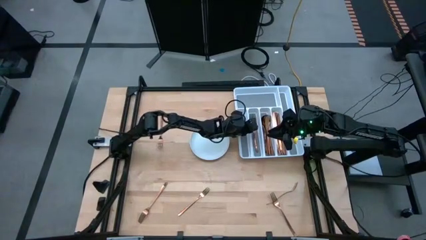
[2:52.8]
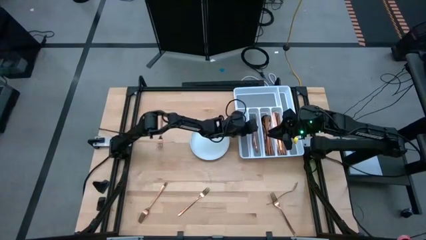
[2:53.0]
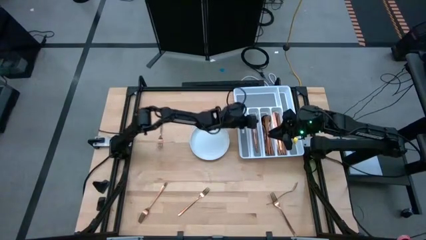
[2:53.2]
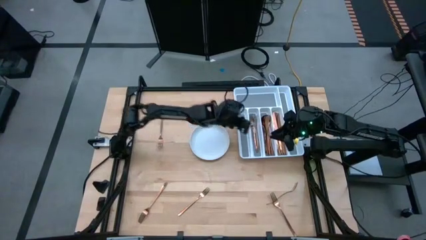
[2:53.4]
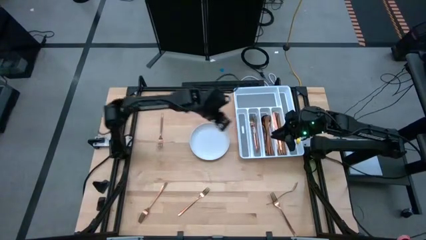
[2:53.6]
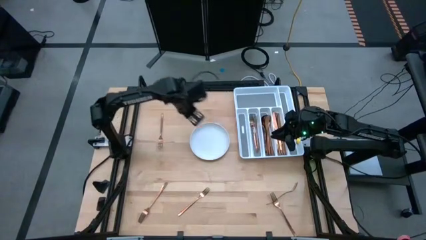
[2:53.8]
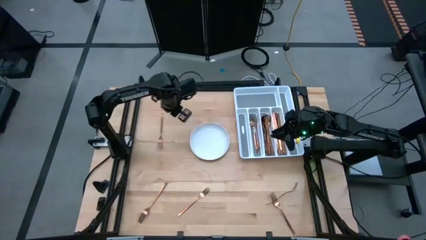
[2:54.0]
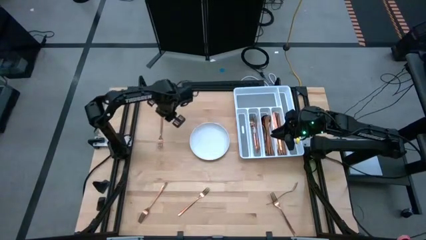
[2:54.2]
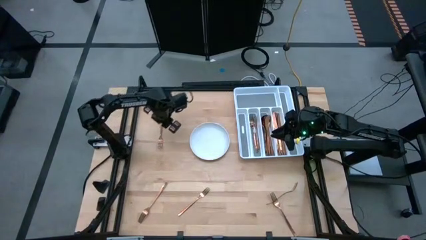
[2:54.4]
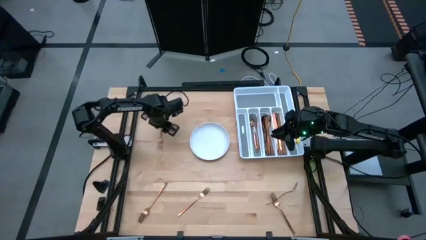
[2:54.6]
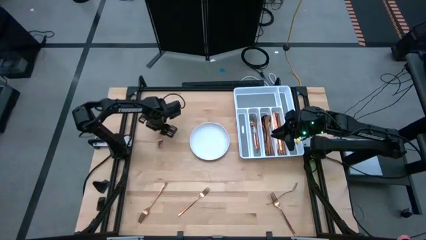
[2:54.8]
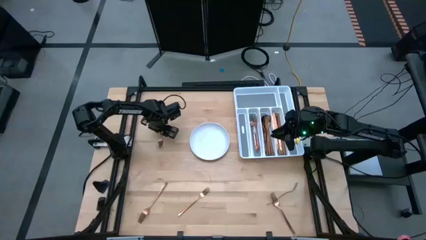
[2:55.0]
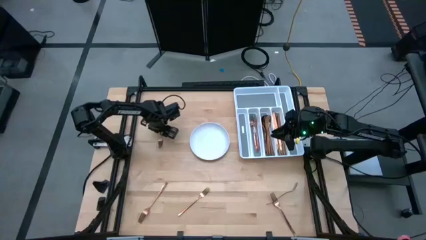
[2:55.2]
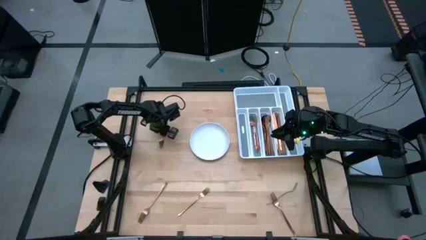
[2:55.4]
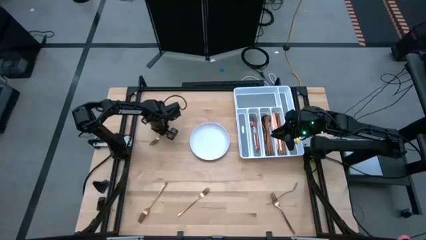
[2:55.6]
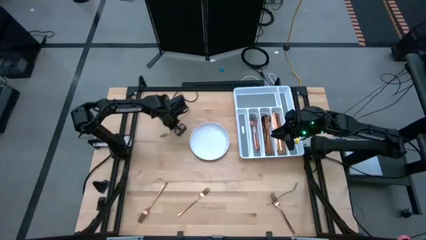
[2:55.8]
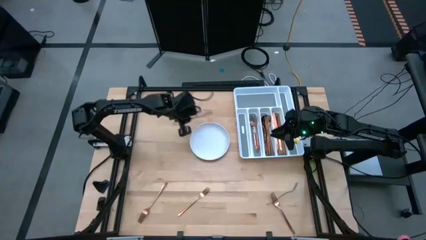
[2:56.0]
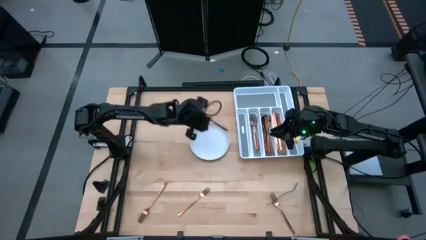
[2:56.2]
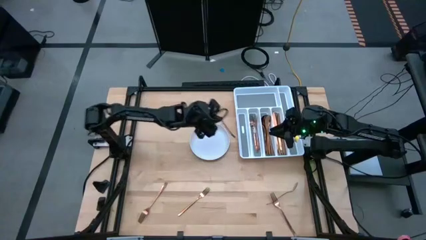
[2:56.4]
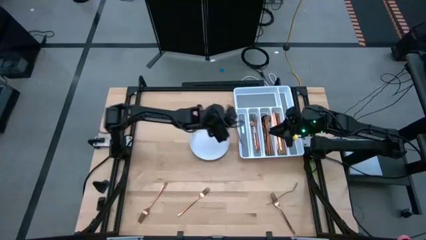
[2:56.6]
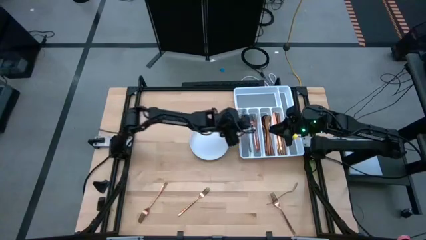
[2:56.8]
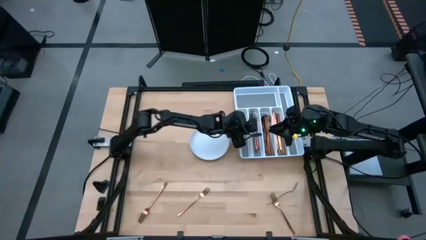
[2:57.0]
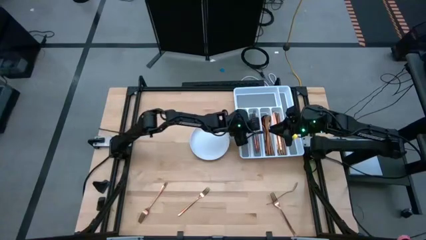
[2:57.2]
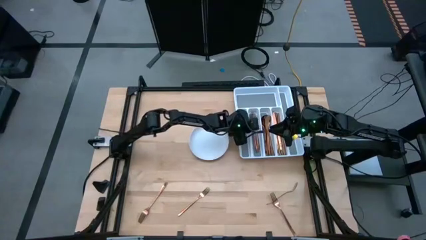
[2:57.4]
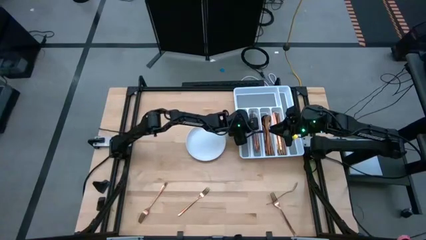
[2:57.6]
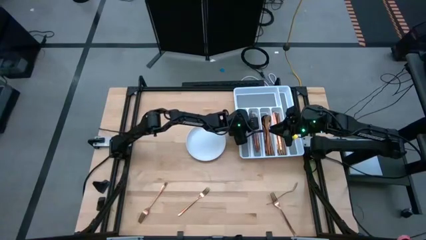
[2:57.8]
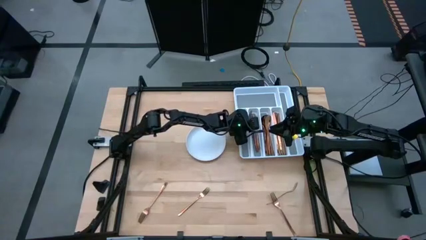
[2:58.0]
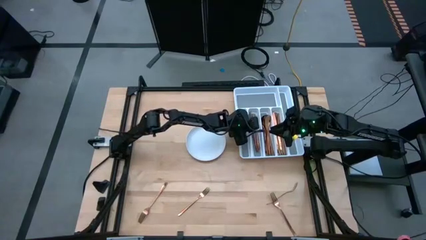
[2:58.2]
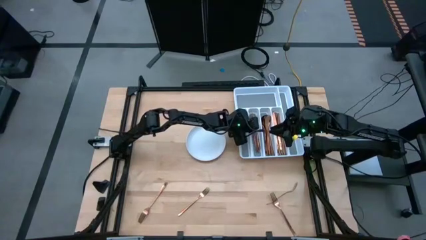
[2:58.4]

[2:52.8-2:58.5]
Task: Sort silverware
Put the fork in the silverware tray

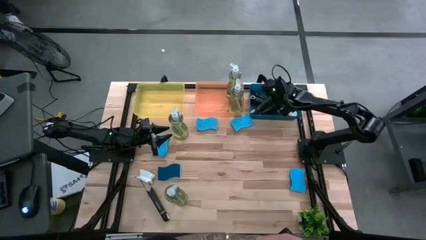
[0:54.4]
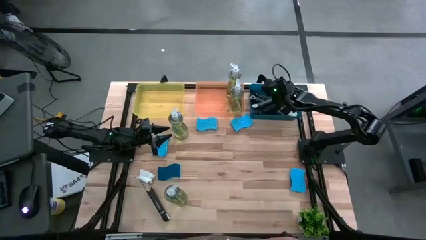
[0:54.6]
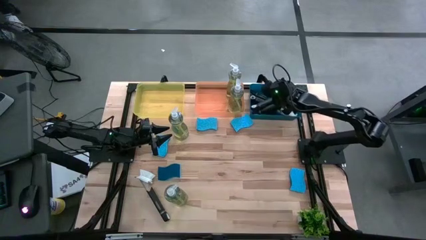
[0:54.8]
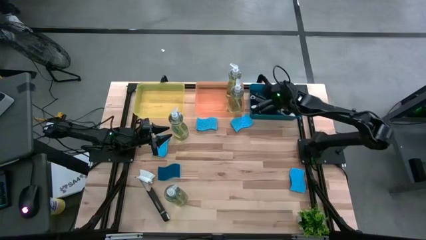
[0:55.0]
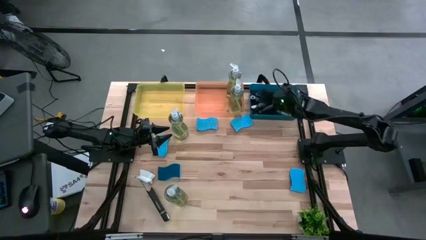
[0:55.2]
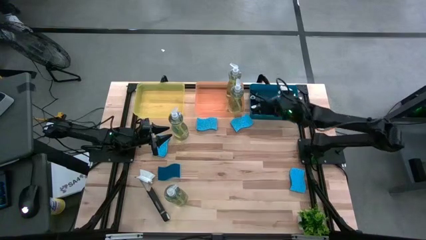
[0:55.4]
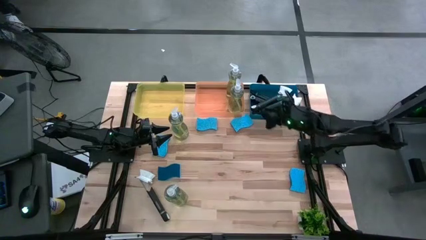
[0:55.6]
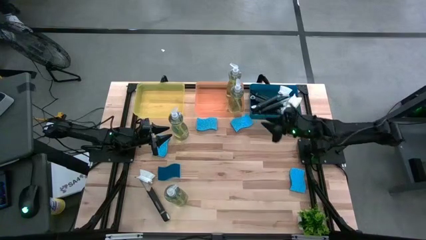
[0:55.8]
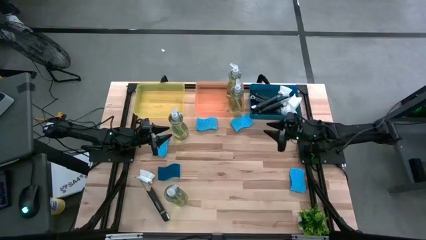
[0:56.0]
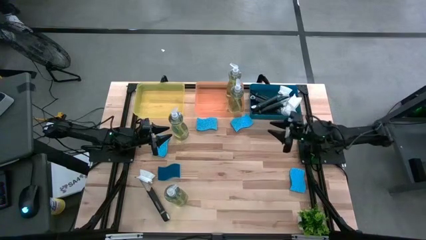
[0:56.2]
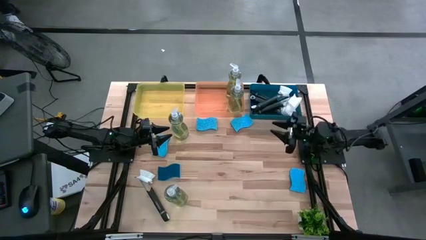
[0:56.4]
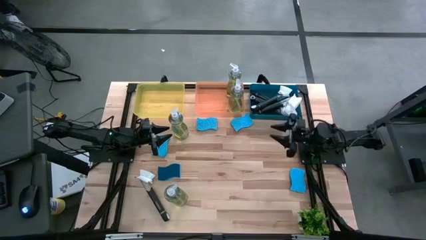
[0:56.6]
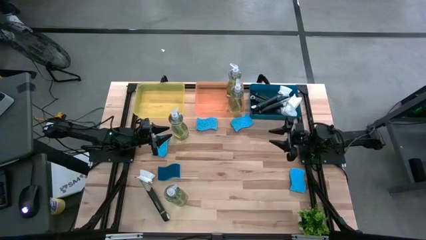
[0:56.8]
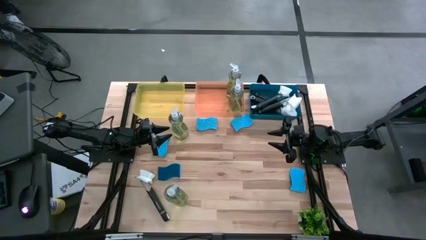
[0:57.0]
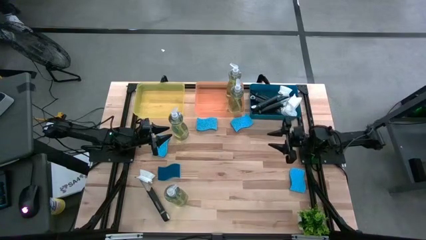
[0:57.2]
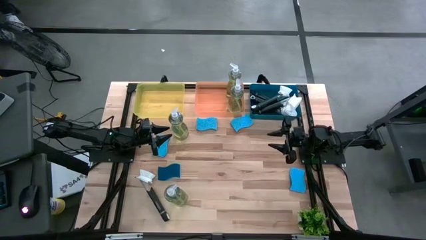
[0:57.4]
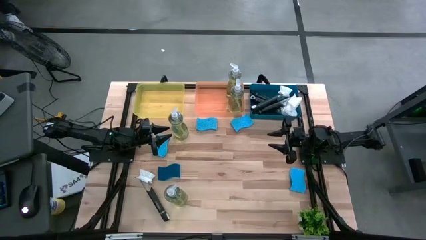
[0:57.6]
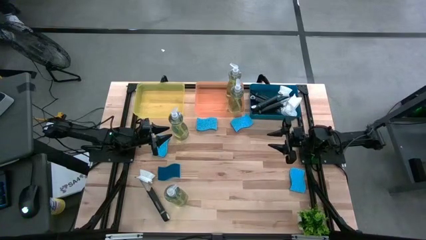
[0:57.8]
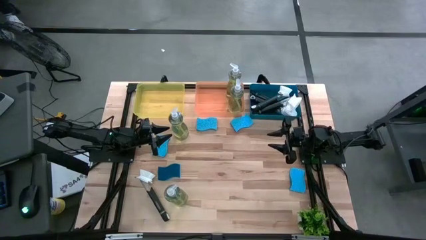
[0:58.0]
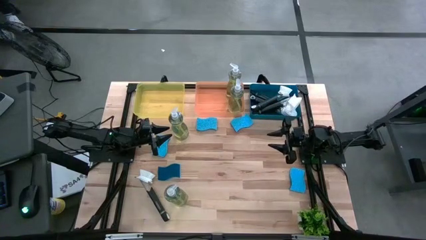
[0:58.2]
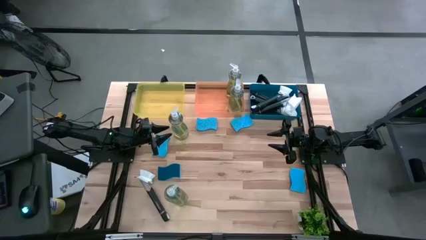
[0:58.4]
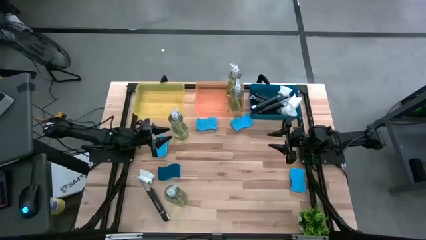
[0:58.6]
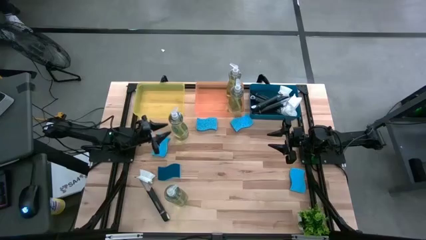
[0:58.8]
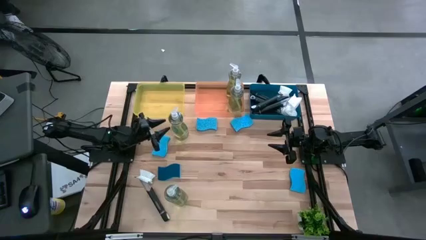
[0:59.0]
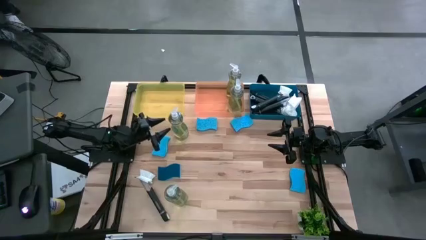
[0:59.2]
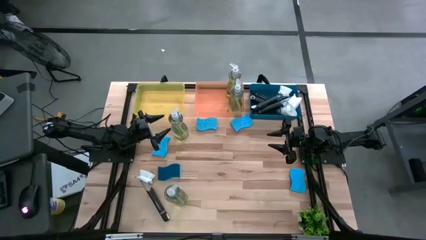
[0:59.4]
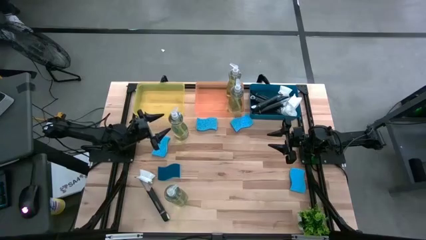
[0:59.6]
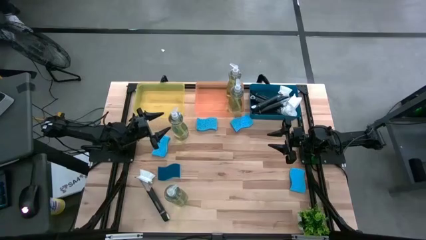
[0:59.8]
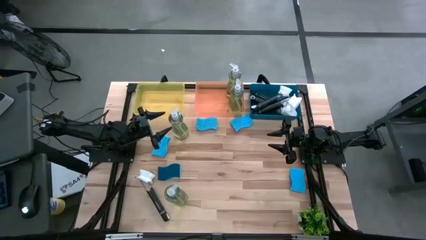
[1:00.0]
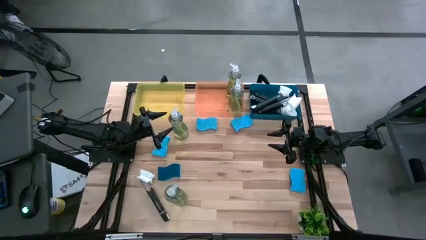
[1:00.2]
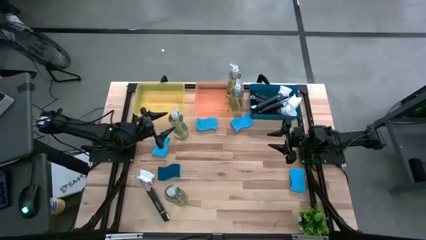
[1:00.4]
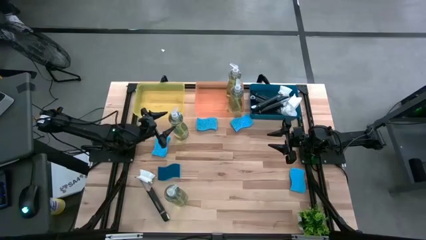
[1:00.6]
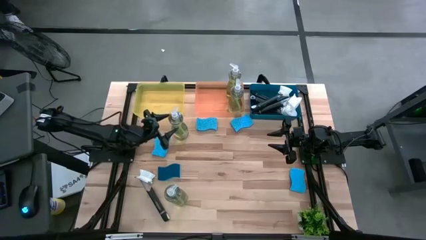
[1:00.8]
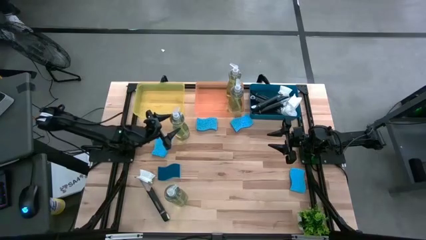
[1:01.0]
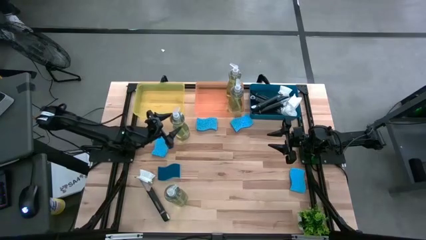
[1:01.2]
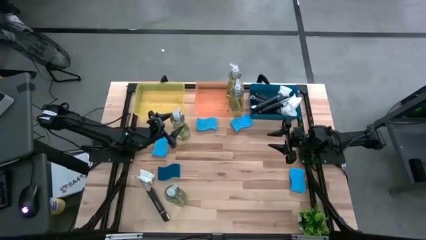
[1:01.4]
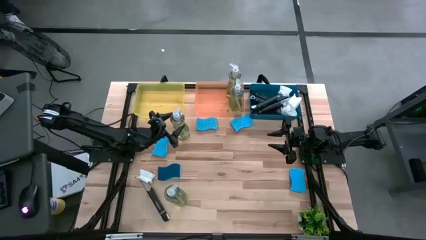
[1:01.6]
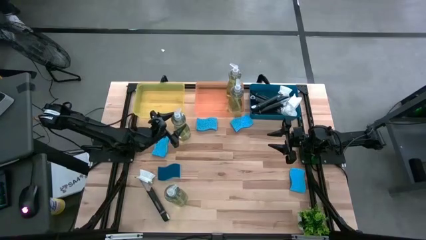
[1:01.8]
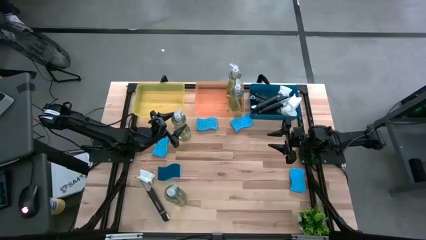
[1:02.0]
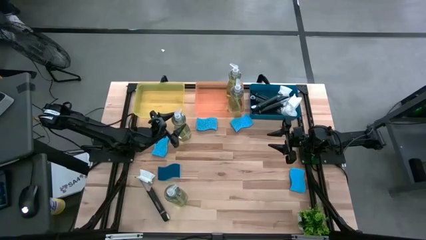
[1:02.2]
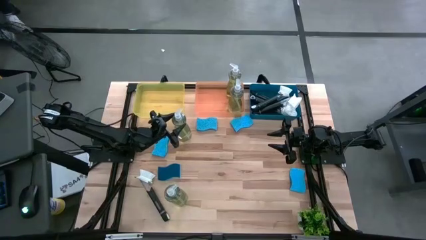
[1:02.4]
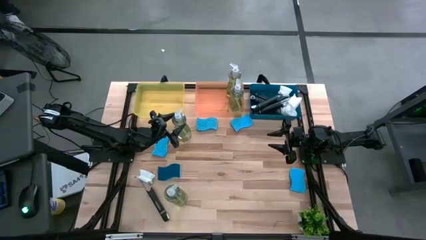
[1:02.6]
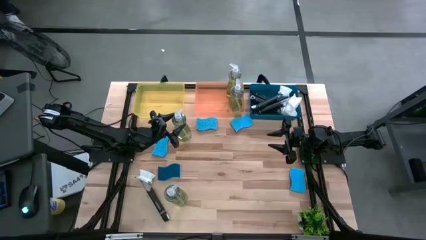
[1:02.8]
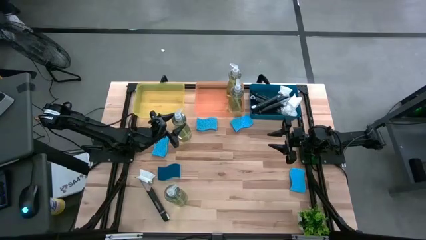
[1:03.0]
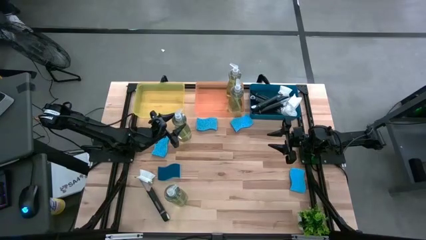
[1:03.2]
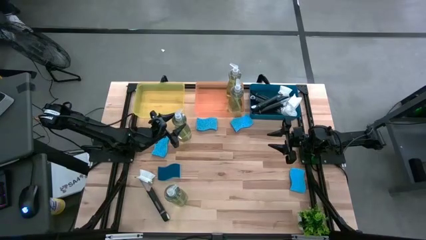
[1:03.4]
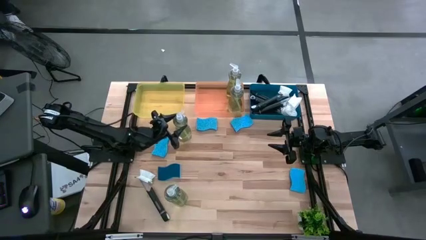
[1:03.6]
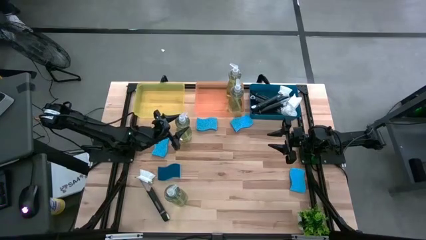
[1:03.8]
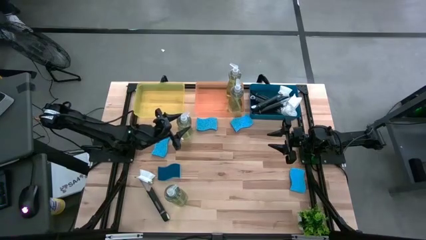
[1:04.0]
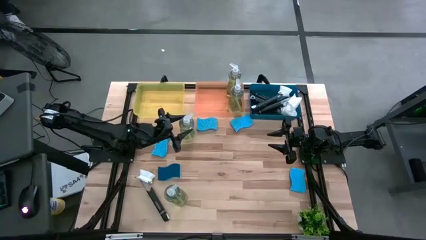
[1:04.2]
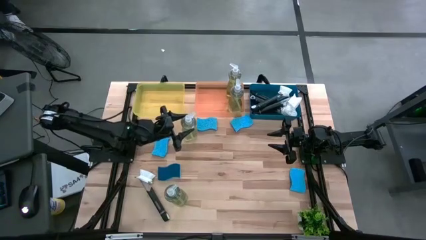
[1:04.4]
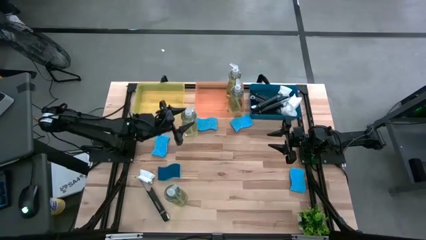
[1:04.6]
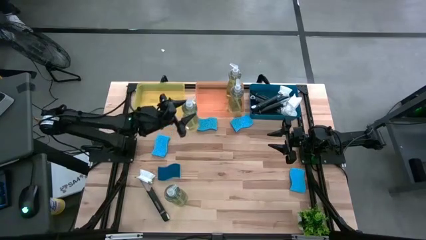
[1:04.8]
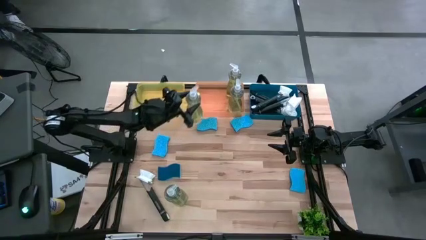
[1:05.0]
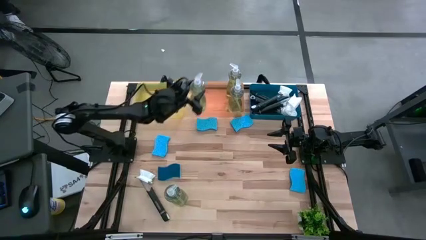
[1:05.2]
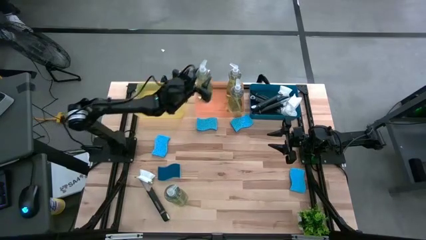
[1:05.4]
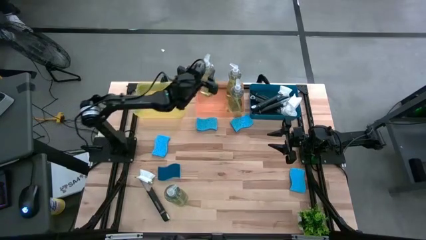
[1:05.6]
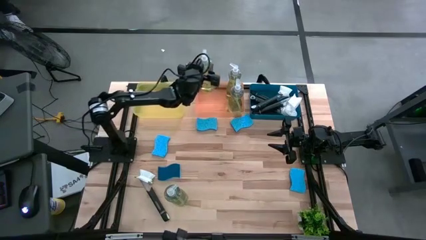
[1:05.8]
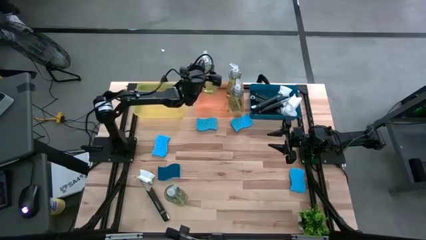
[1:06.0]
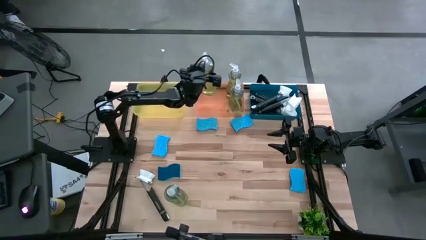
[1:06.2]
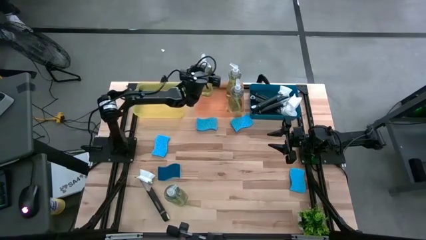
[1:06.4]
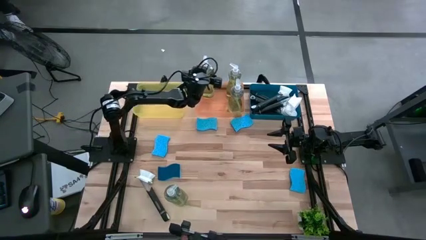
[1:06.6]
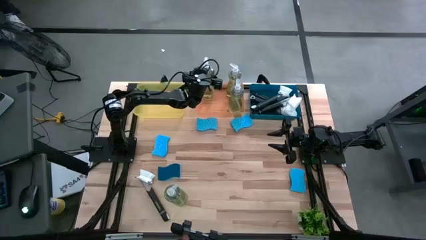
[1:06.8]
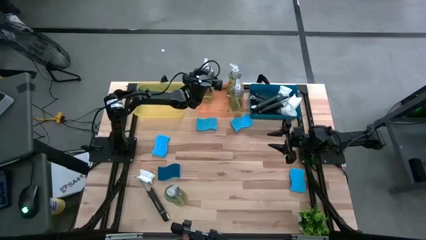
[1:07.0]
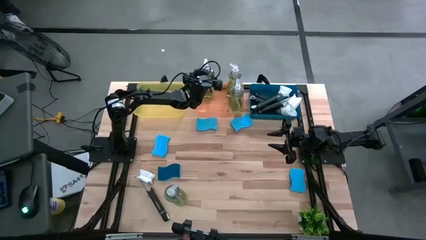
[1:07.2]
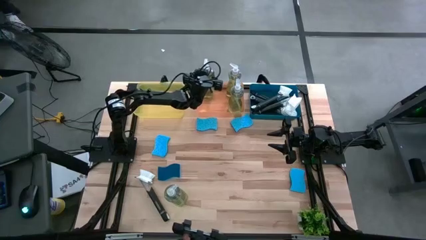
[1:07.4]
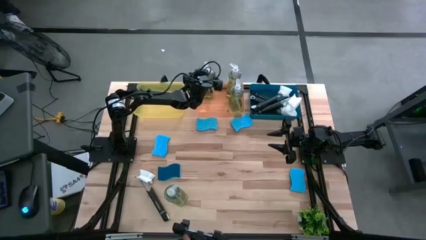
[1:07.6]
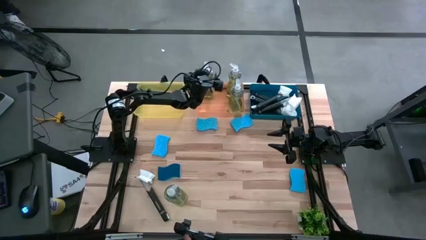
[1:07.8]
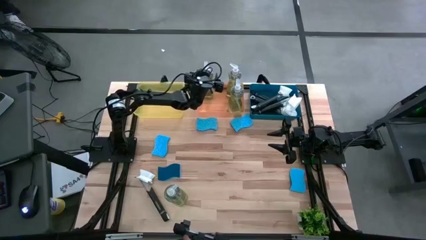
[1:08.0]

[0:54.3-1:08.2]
Task: Pick & Place Kitchen Sink Supplies
Put the transparent soap dispenser into the orange bin
